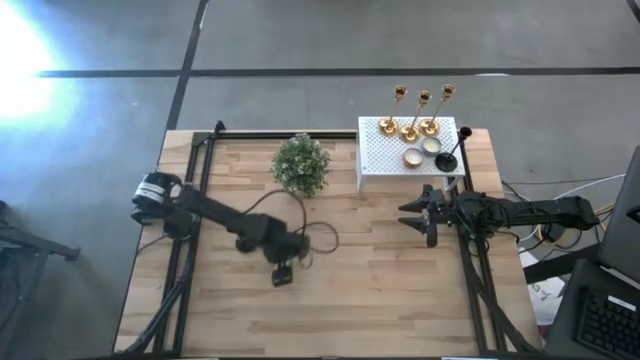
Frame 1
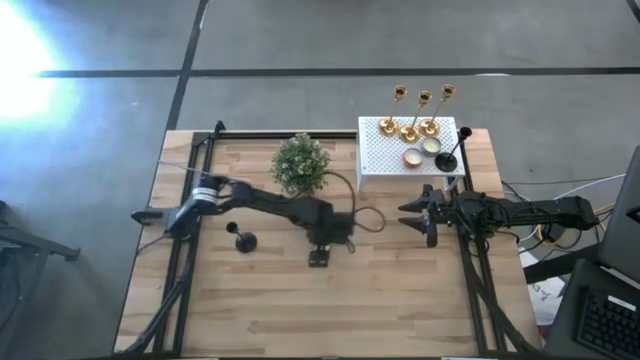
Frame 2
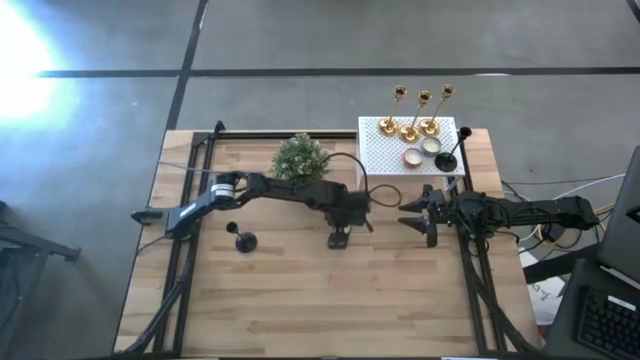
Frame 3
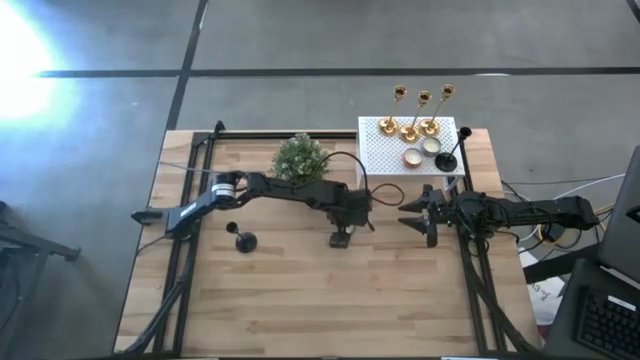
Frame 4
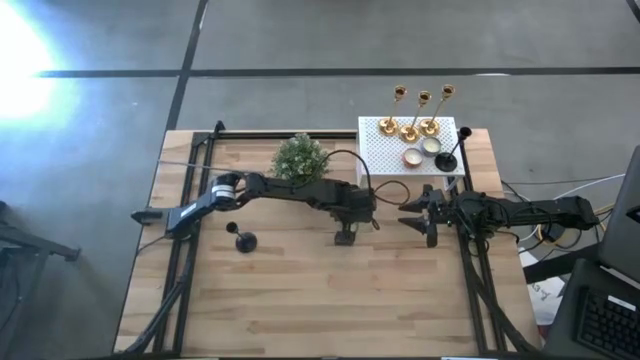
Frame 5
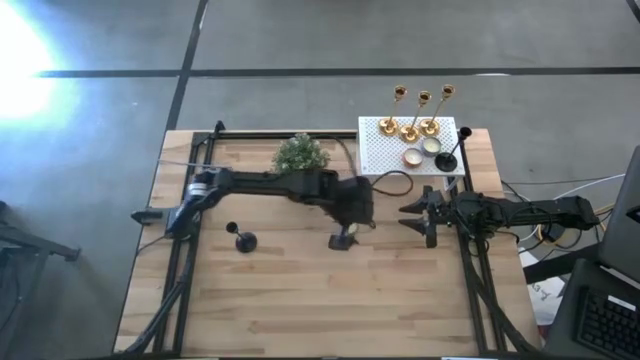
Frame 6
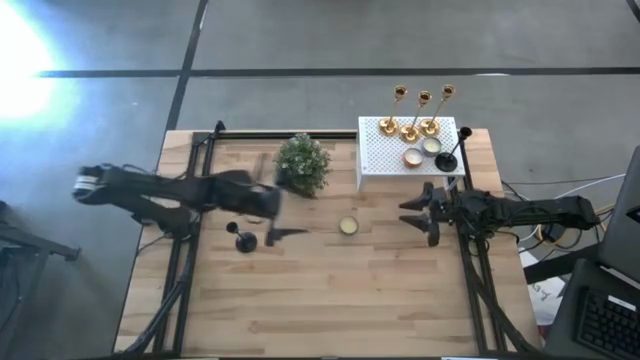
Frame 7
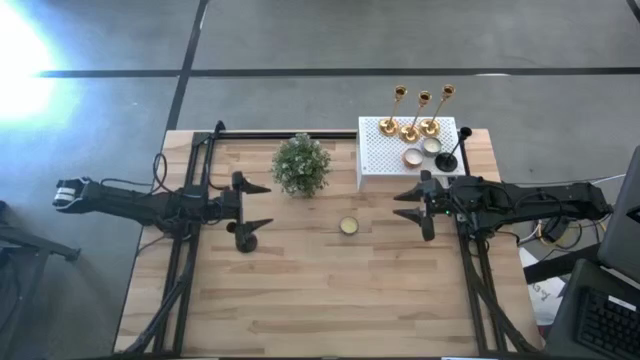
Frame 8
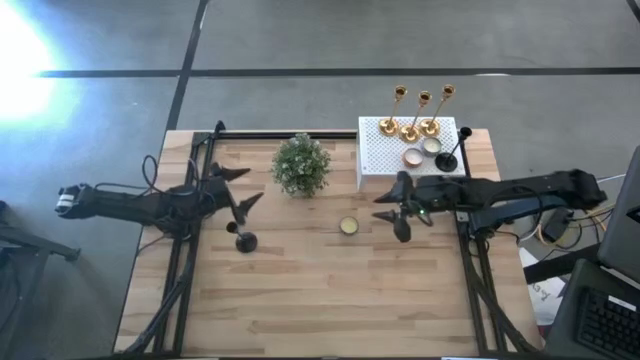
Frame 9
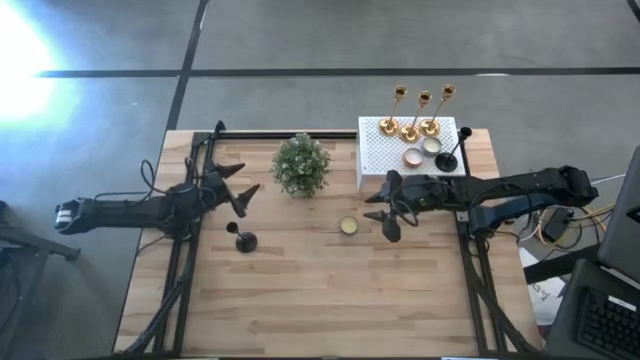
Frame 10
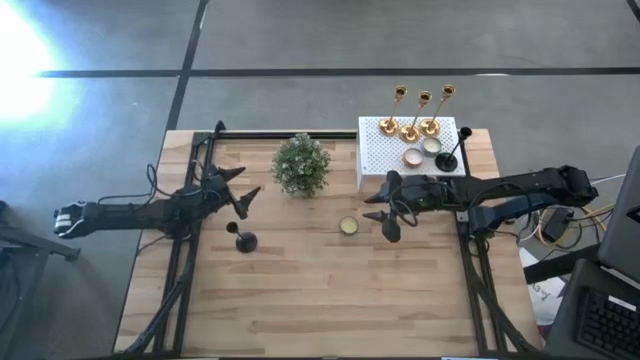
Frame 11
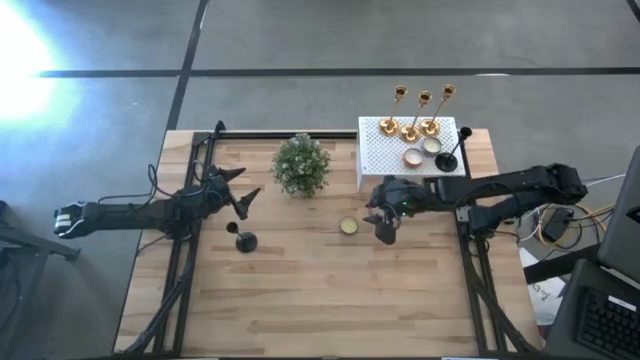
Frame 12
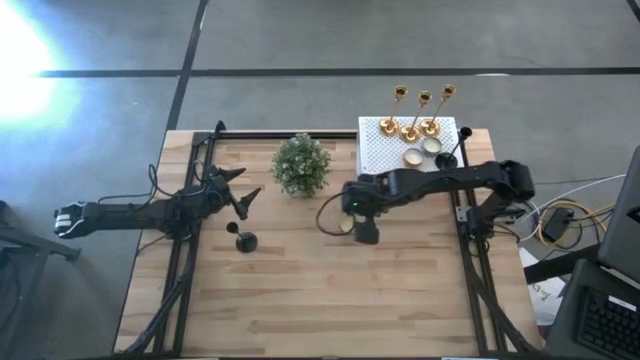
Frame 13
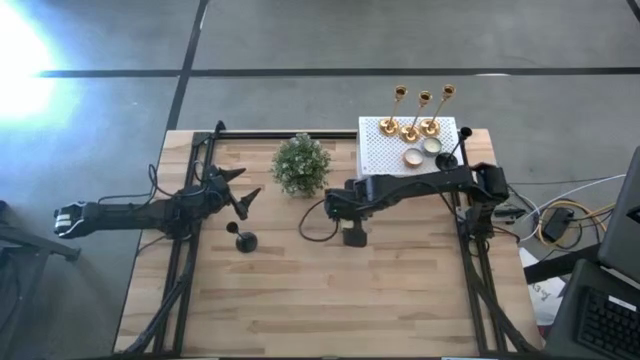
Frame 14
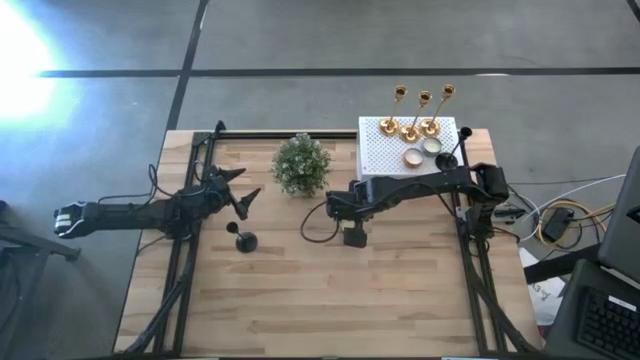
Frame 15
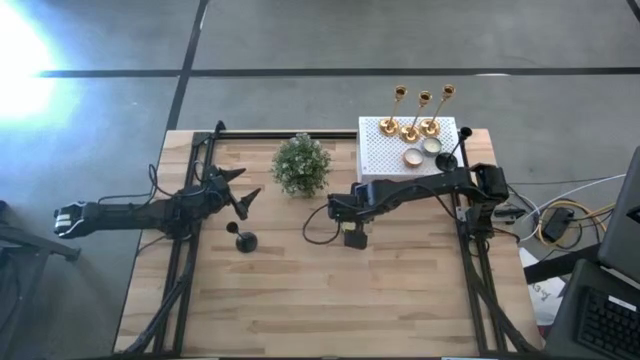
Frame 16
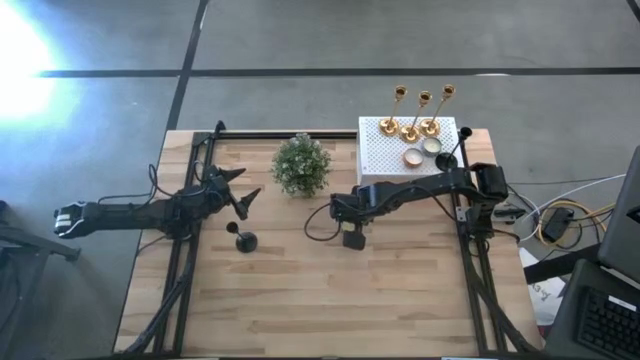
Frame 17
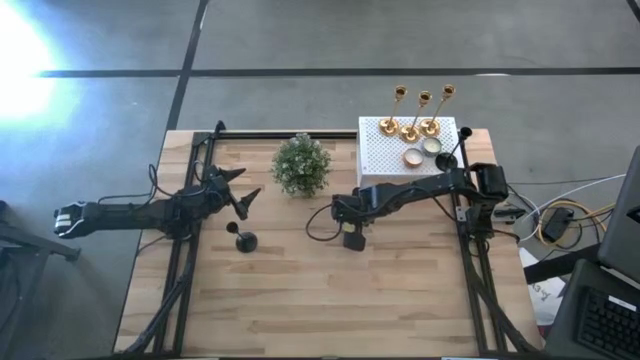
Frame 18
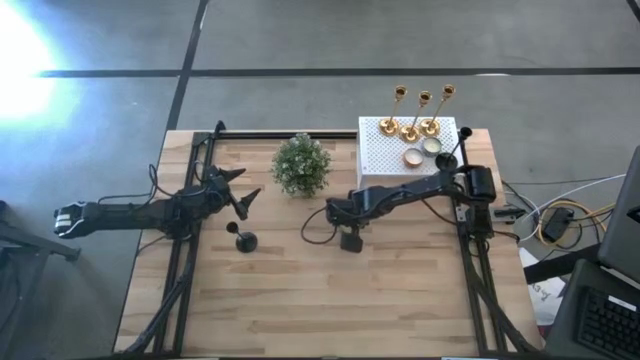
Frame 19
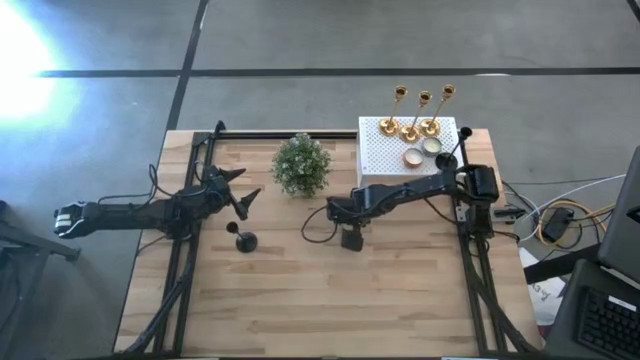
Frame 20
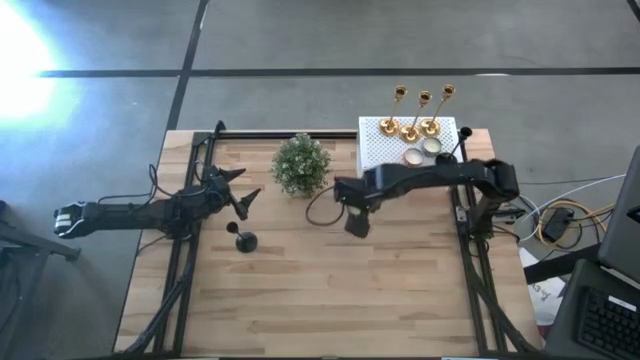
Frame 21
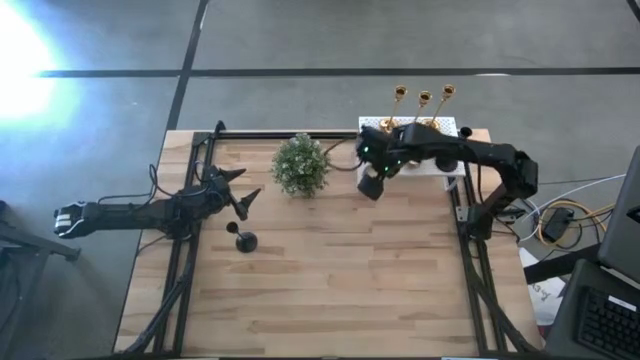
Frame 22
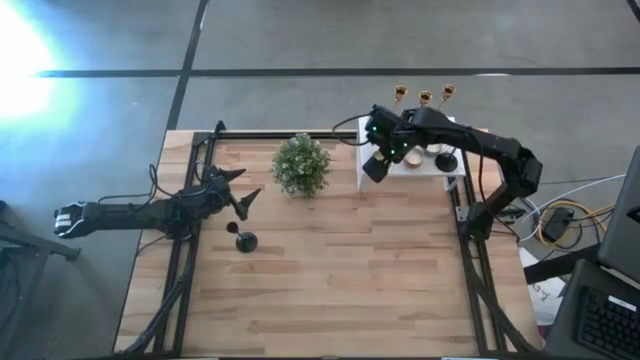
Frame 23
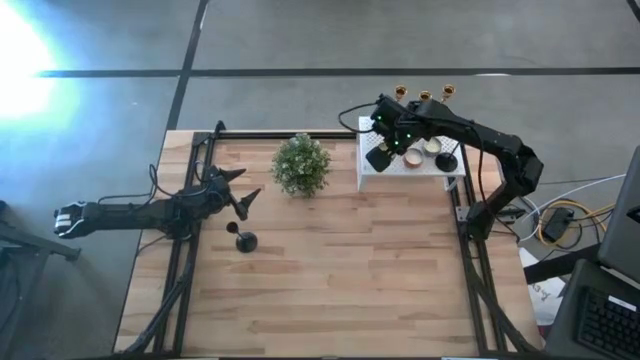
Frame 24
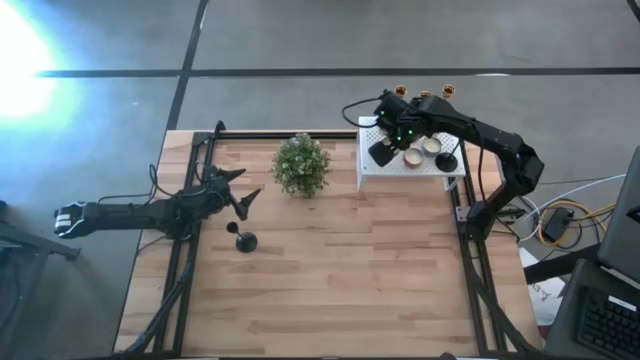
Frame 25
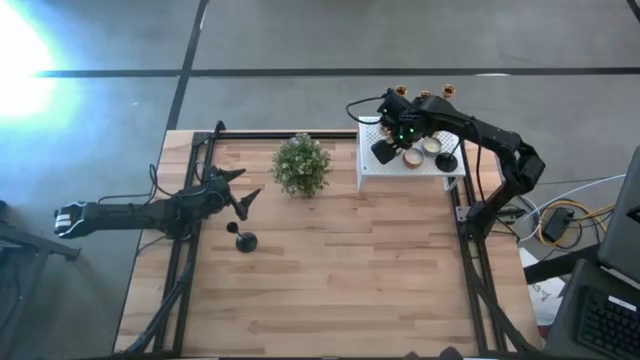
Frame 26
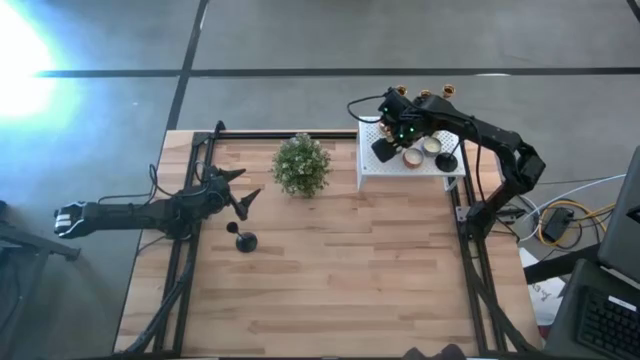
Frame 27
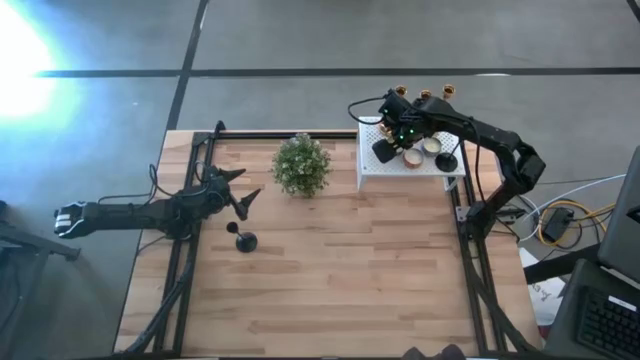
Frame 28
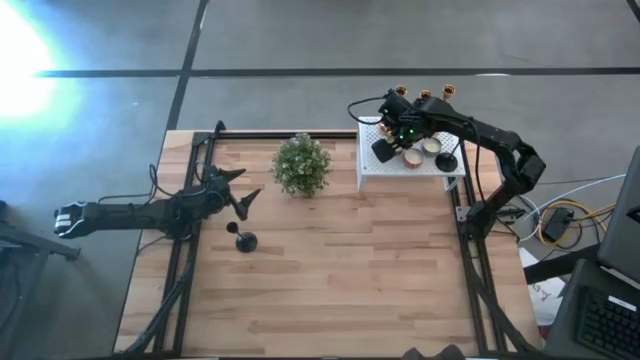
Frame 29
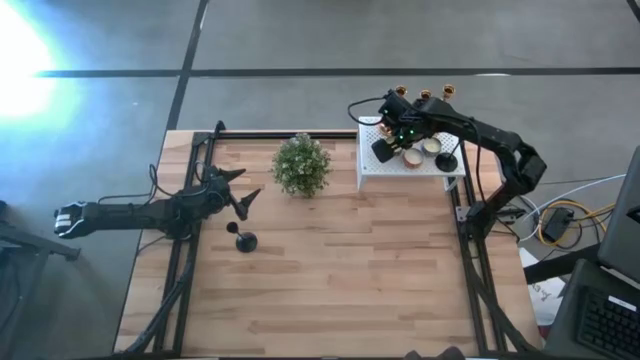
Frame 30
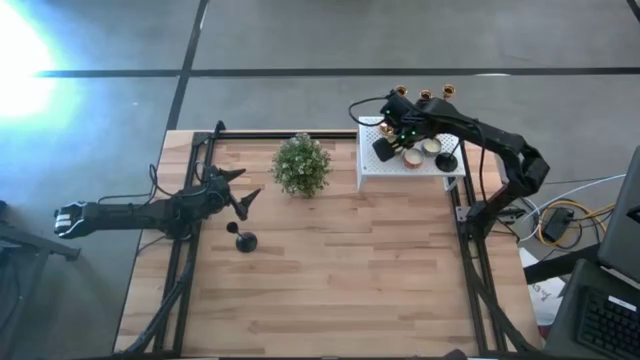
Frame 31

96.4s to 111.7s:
Task: Pick & Place candle stick holders
Put the red scented candle on the shelf
